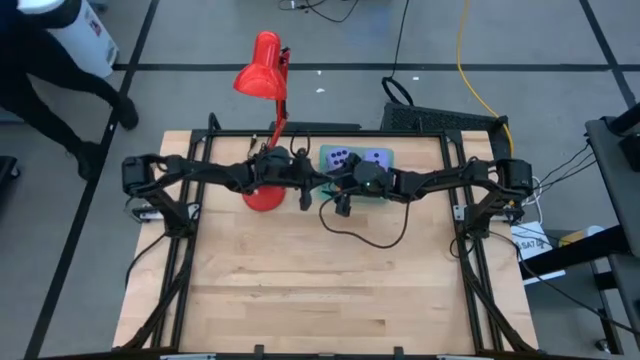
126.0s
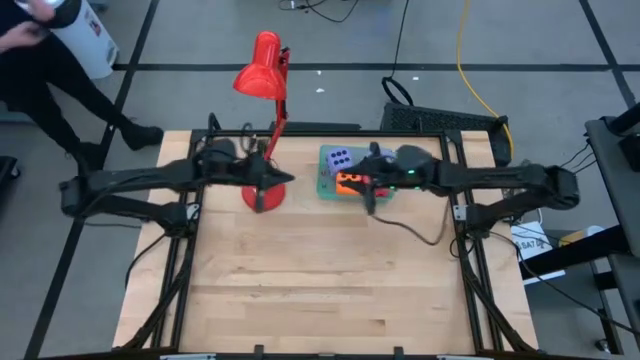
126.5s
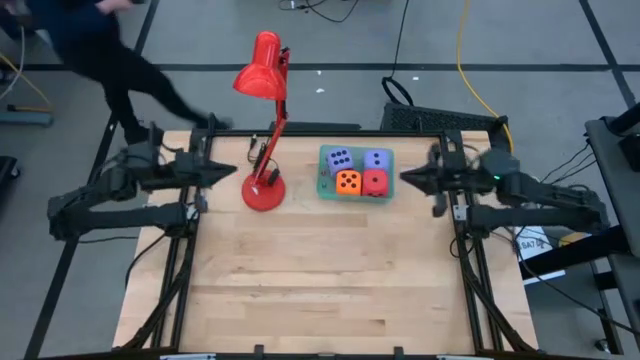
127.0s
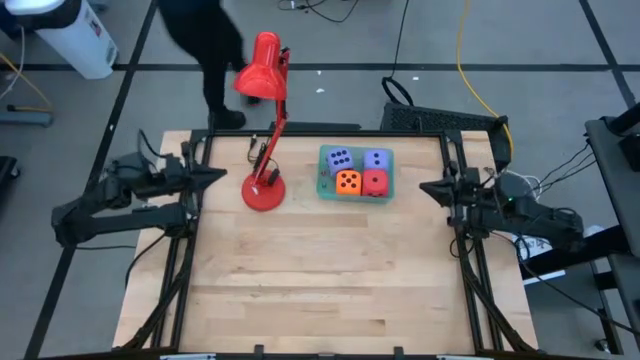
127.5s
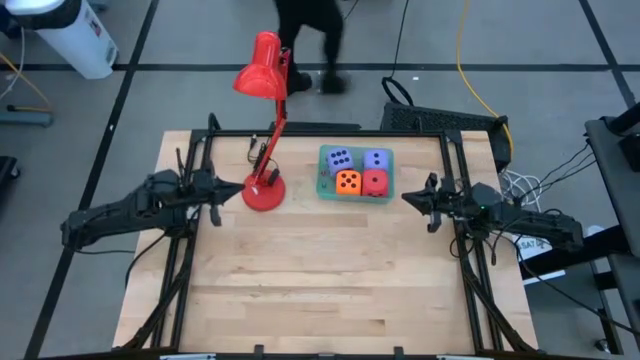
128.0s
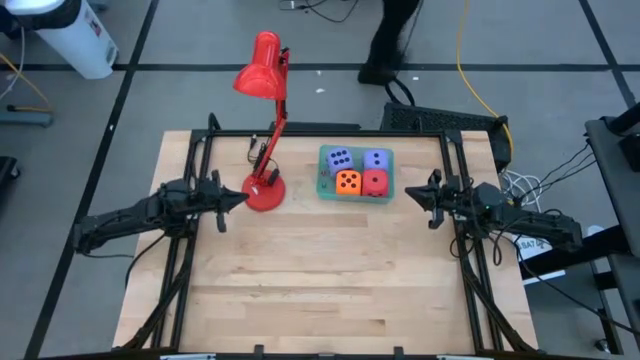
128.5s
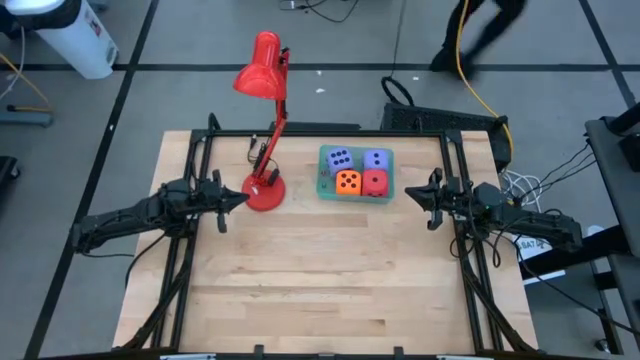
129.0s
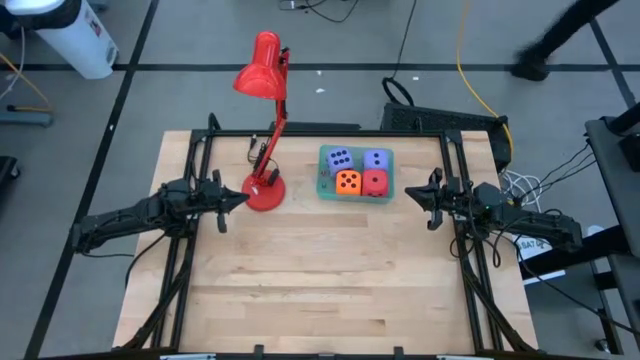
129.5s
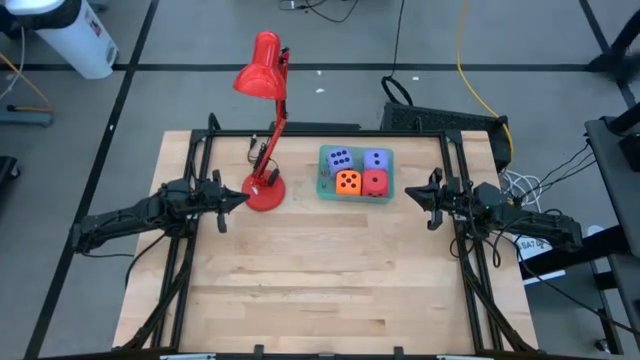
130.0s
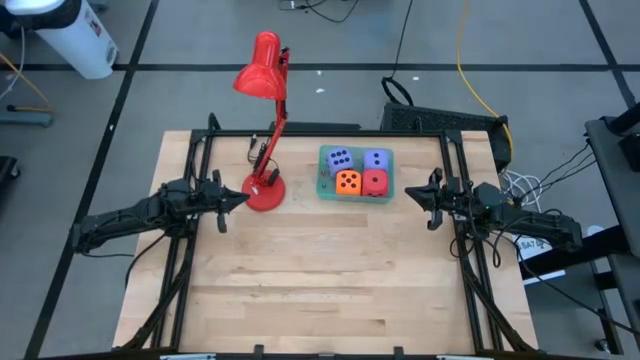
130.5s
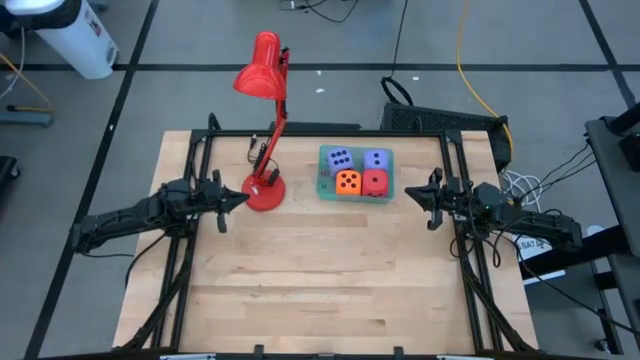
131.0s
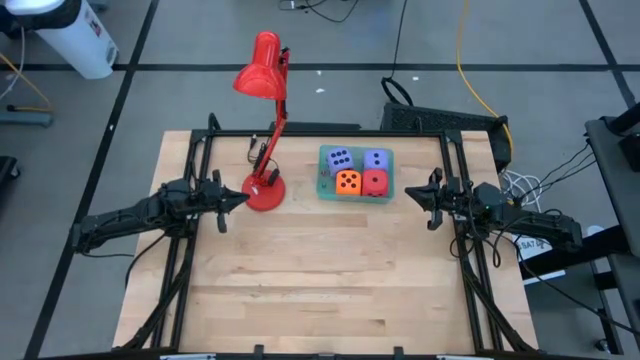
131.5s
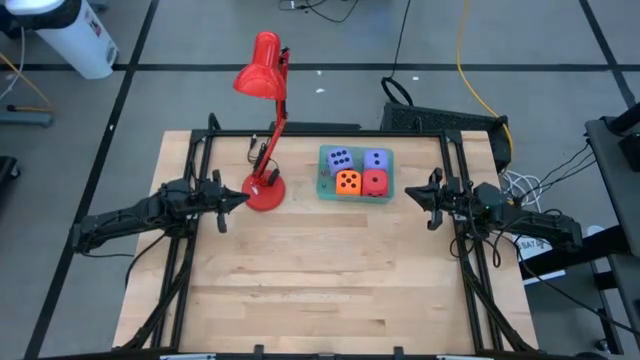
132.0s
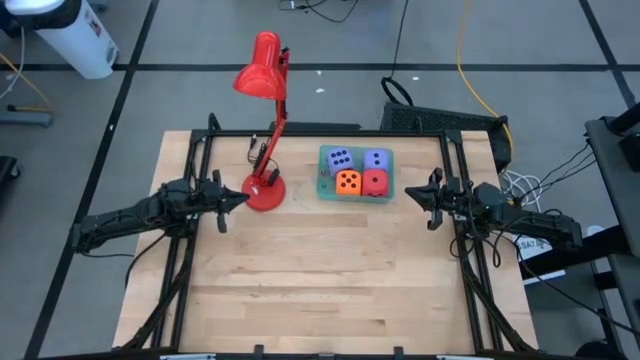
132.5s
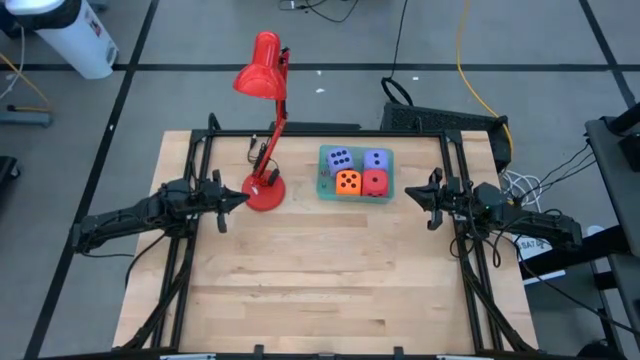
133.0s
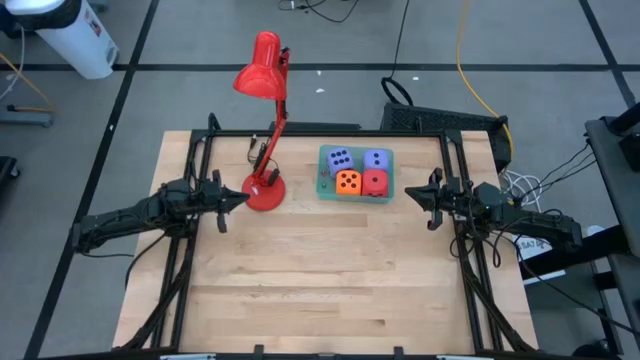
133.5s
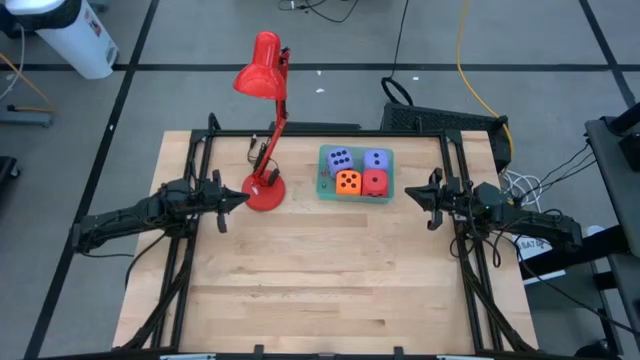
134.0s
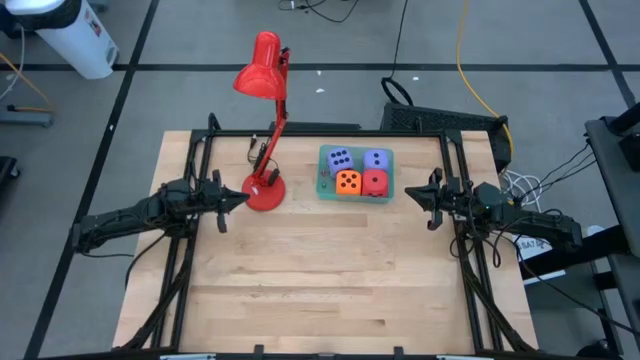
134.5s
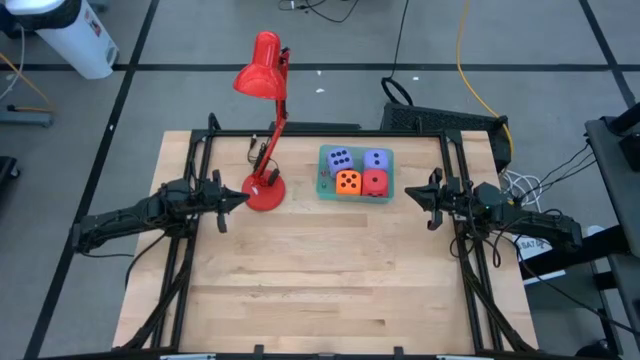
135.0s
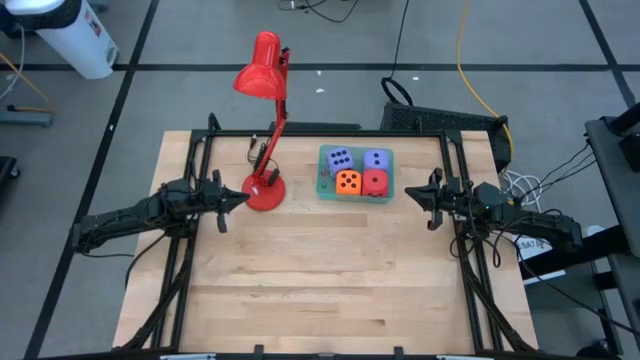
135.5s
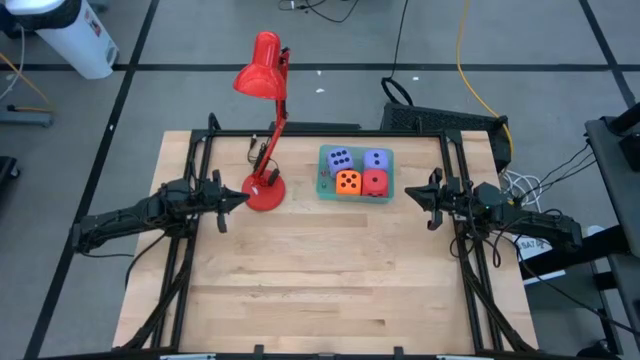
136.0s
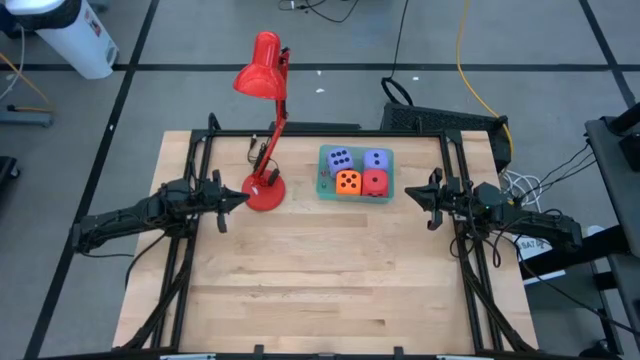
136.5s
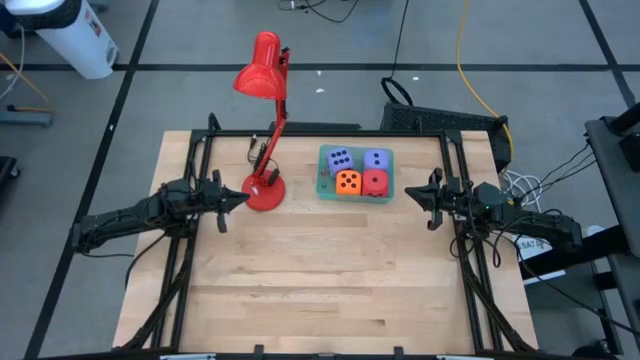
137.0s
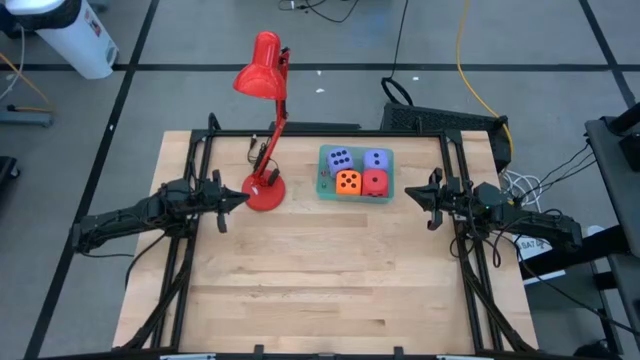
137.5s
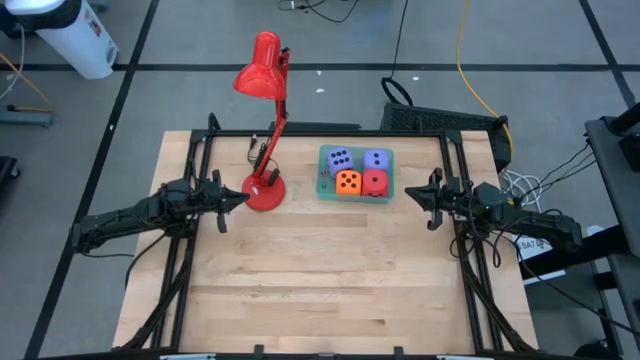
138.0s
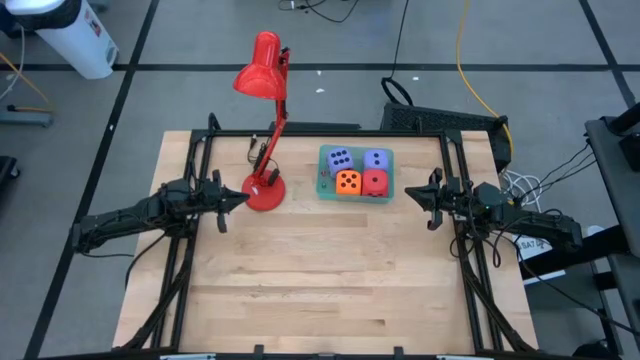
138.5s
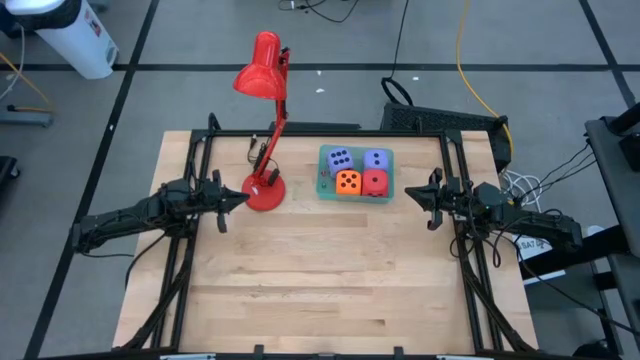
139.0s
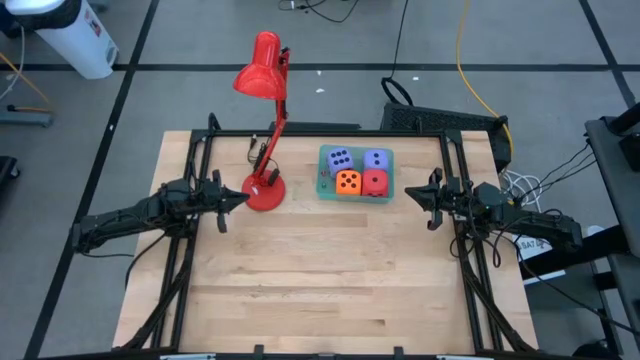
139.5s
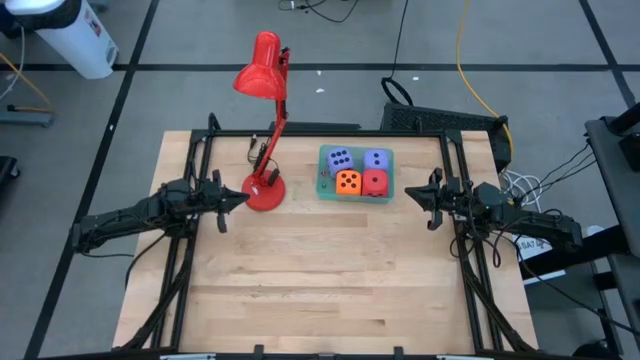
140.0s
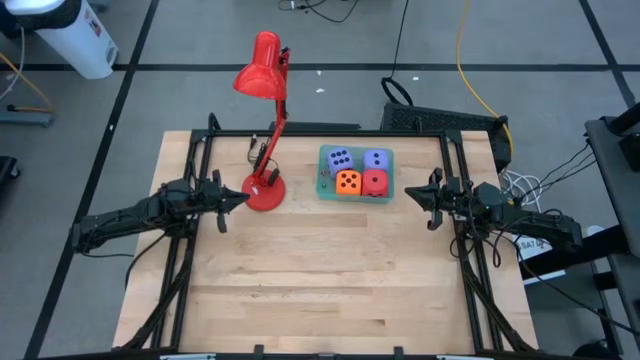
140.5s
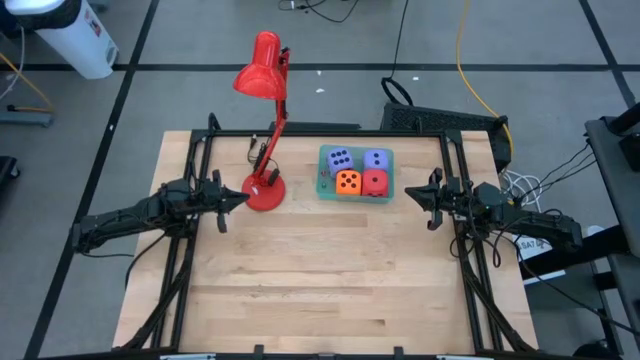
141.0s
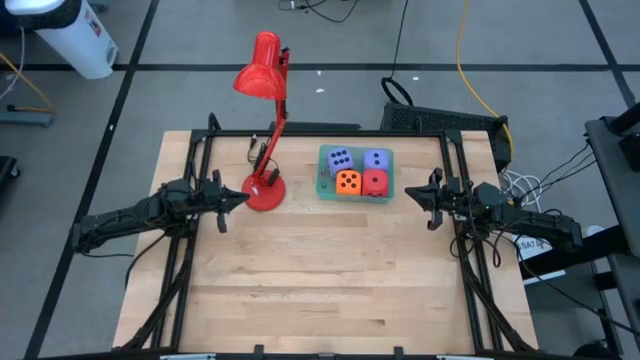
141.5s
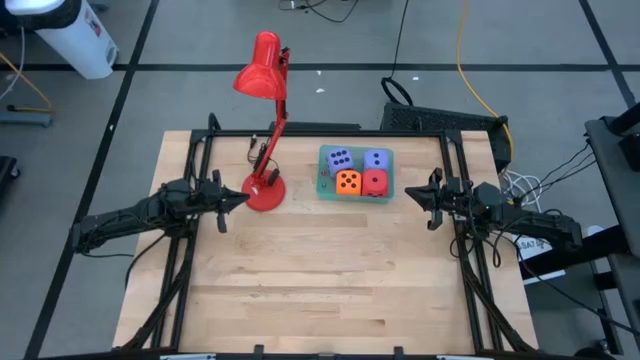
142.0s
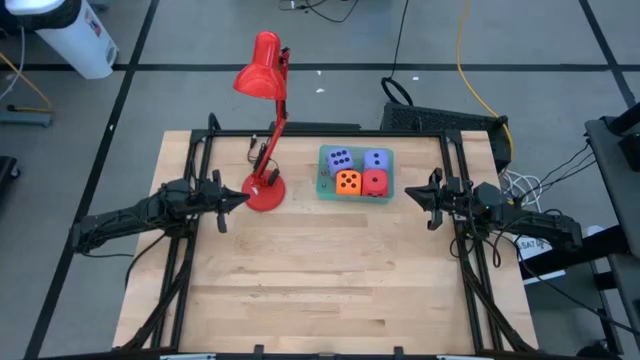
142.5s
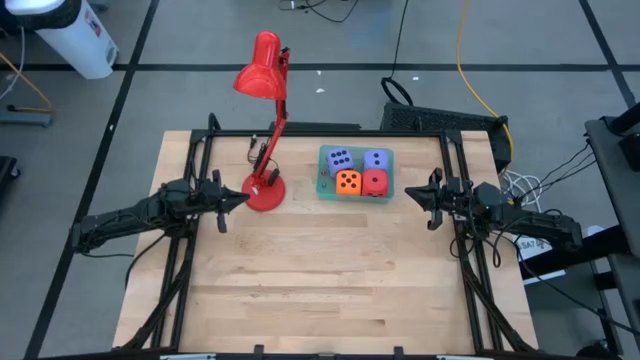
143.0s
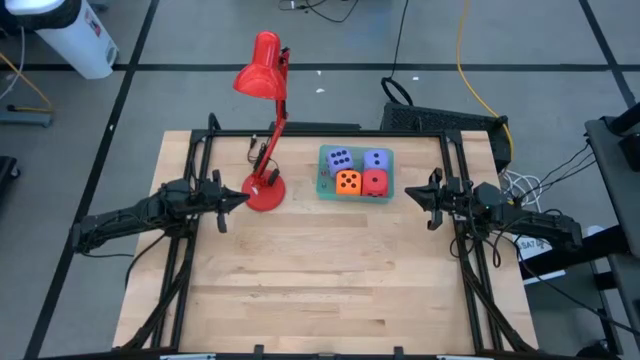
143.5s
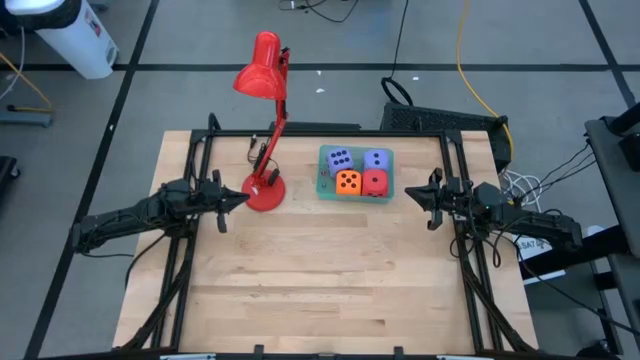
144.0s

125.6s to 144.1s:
Task: Pick & Place Dice
Return to Home Position

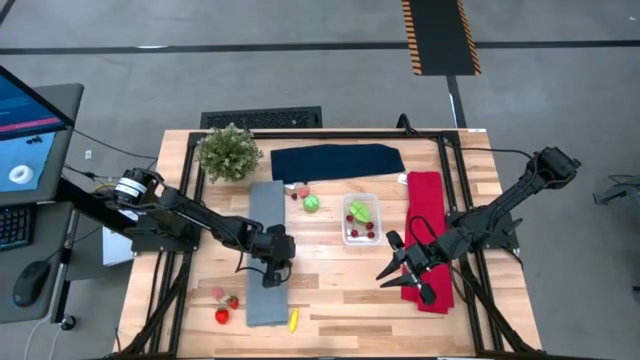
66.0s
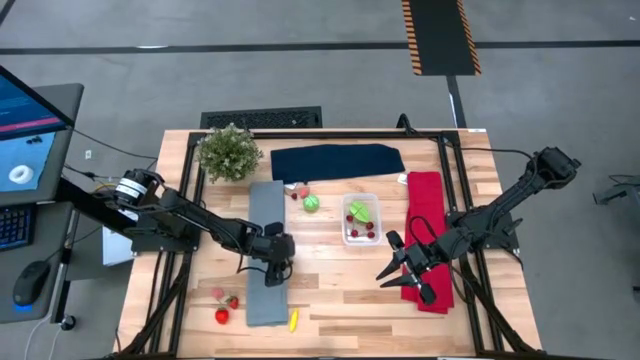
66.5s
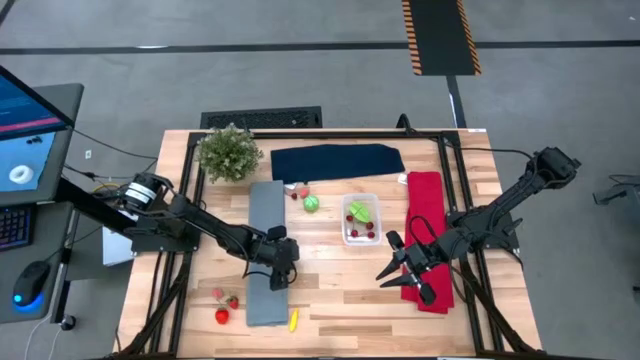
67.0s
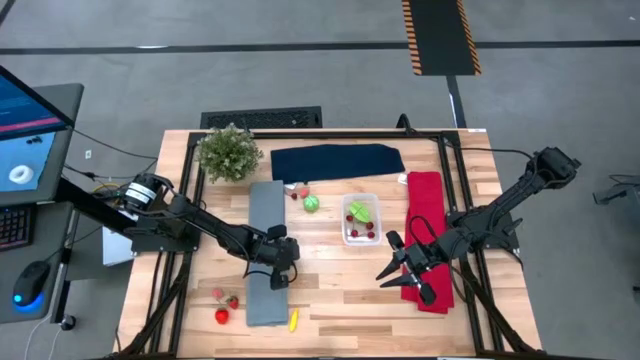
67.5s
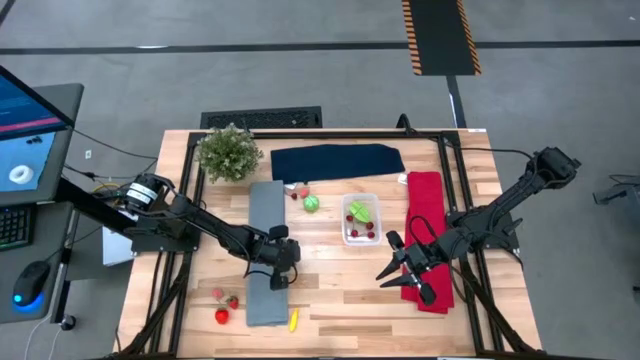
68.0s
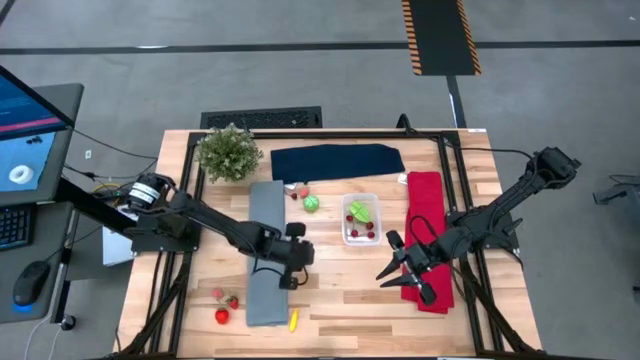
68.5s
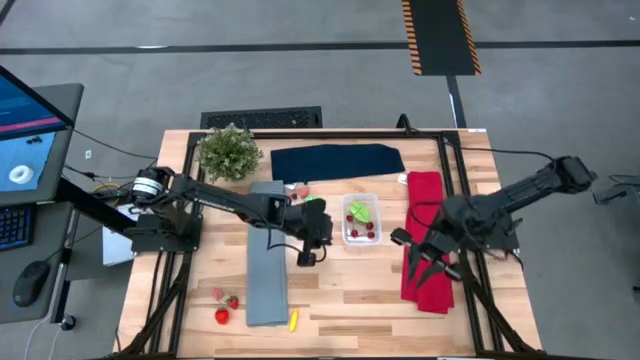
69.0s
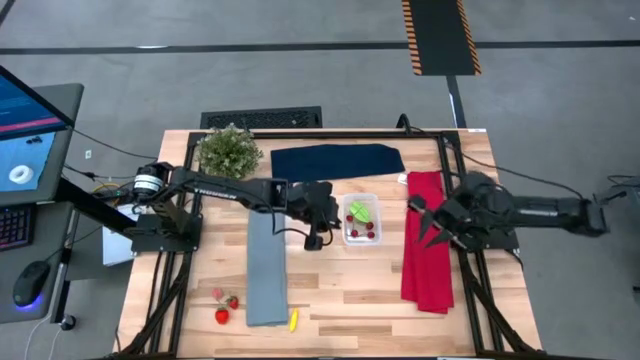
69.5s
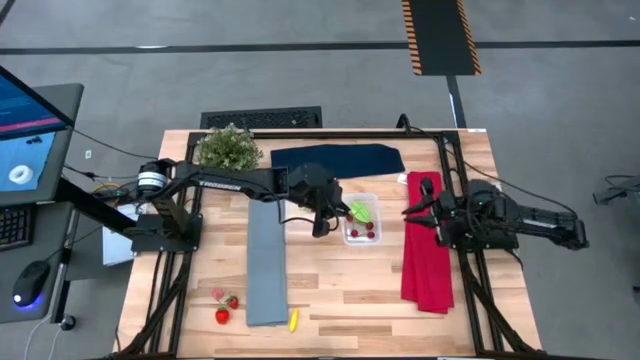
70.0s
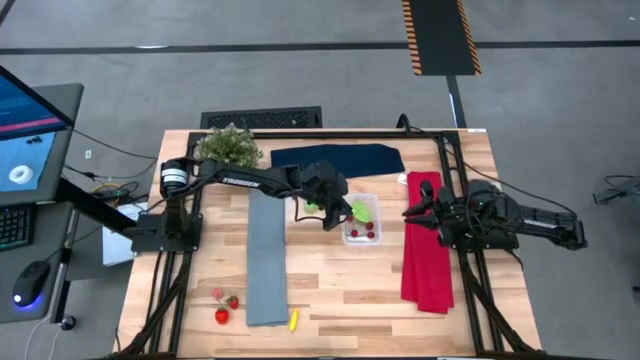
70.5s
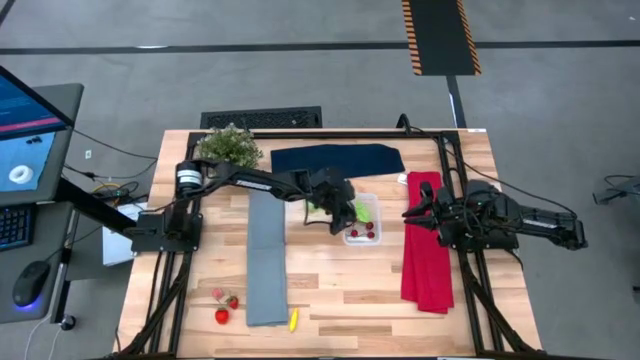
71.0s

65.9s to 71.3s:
Task: Pick and placing Produce into tupperware
Put the blueberry into the transparent bin
